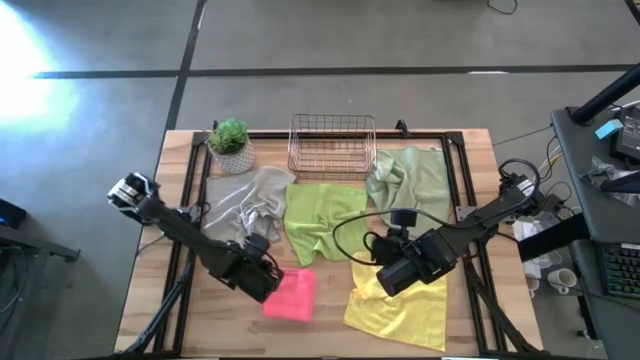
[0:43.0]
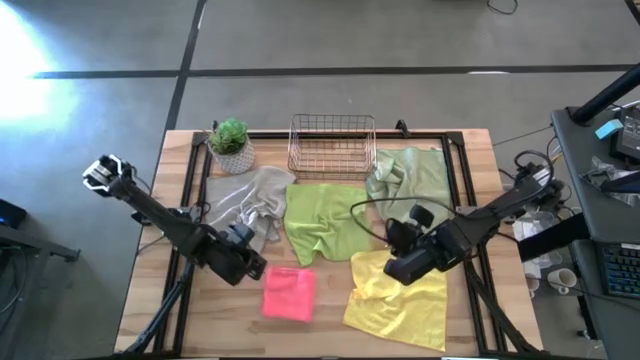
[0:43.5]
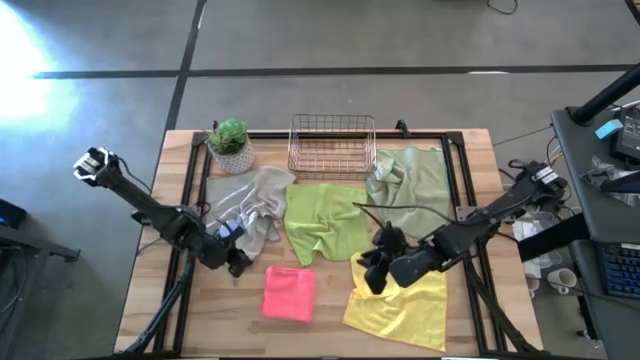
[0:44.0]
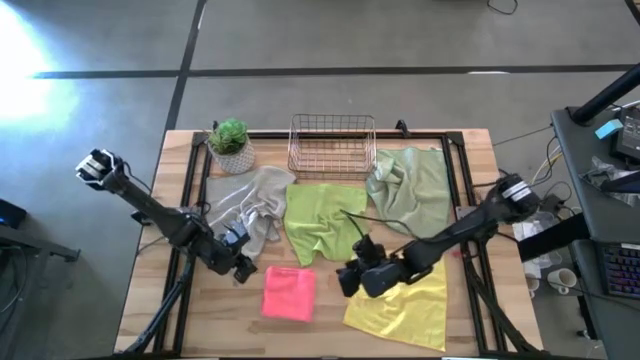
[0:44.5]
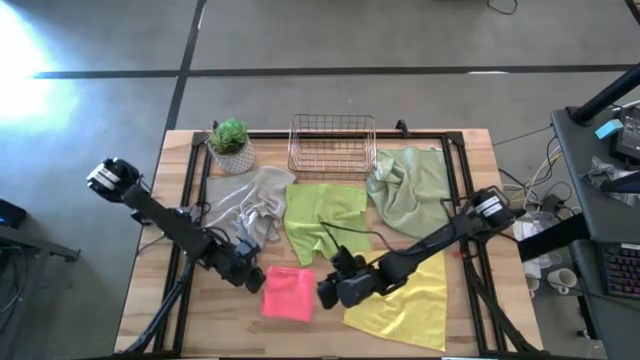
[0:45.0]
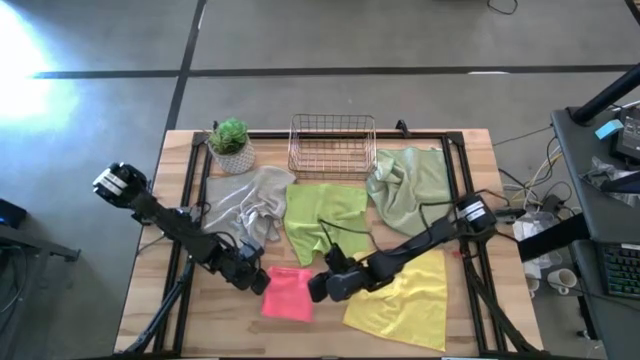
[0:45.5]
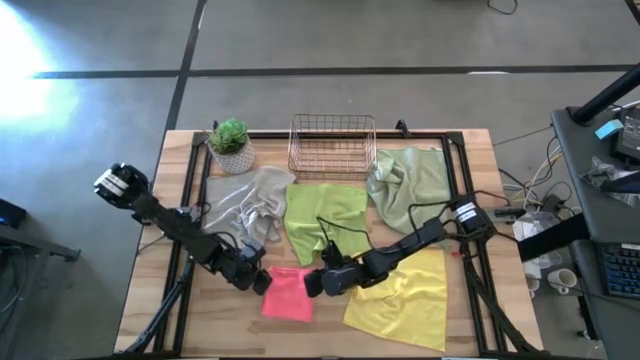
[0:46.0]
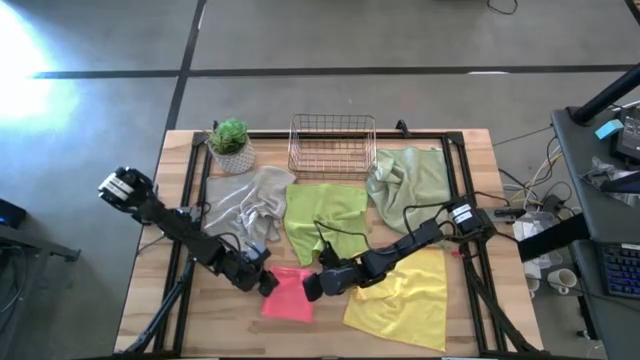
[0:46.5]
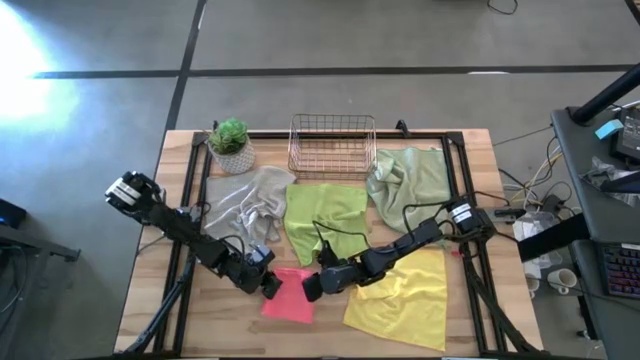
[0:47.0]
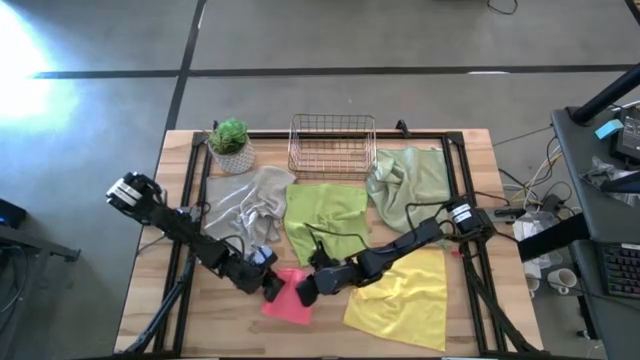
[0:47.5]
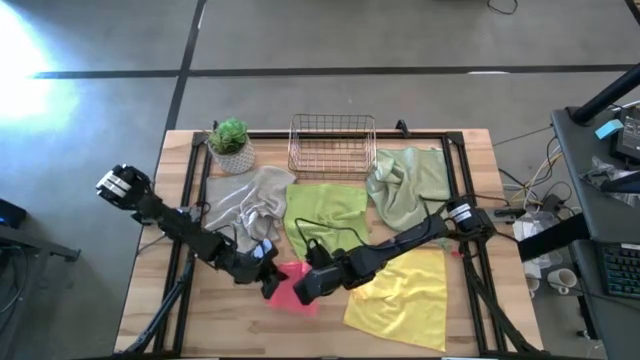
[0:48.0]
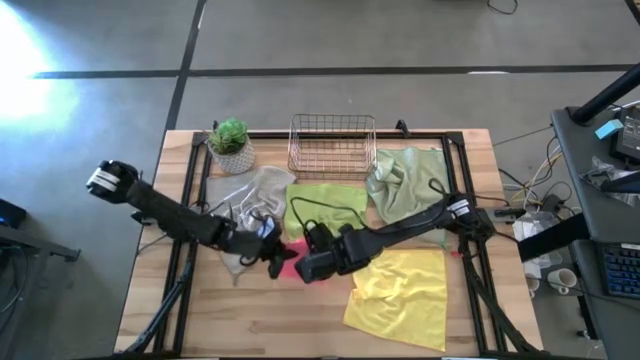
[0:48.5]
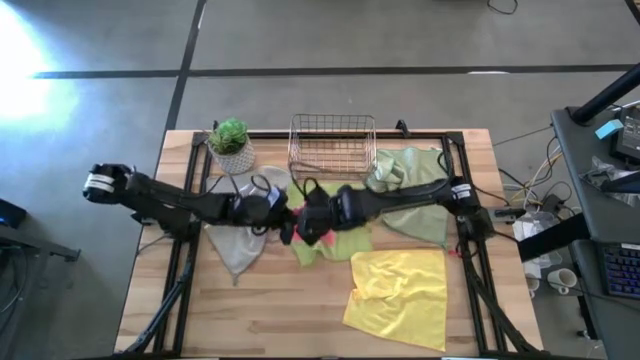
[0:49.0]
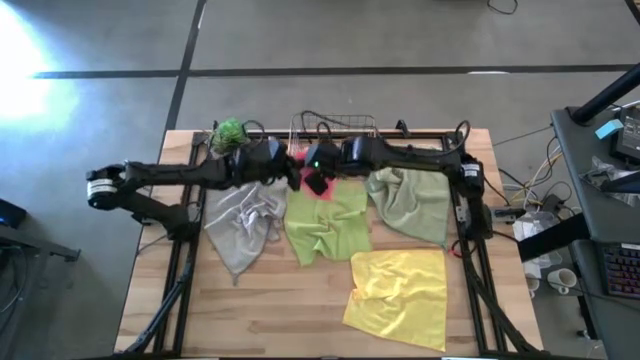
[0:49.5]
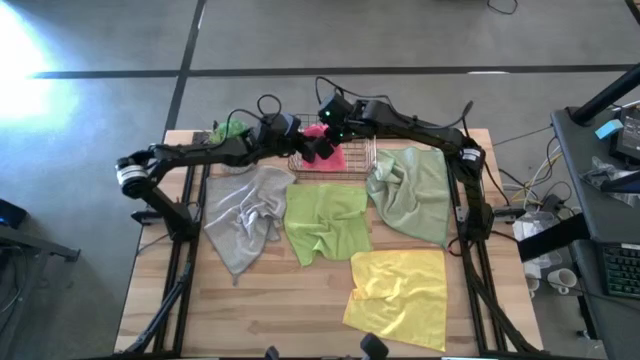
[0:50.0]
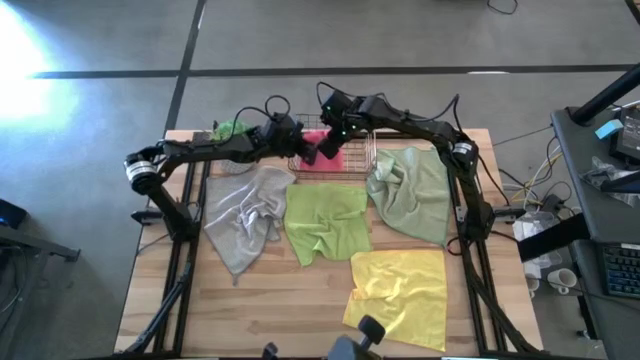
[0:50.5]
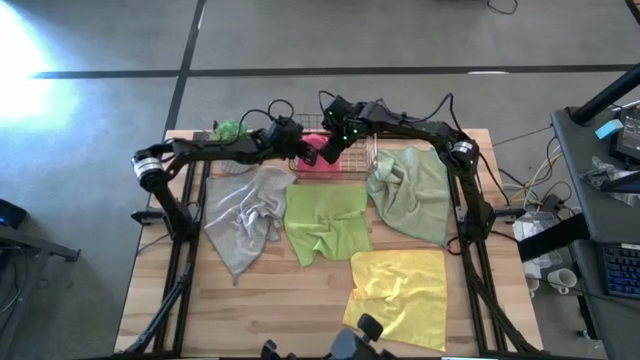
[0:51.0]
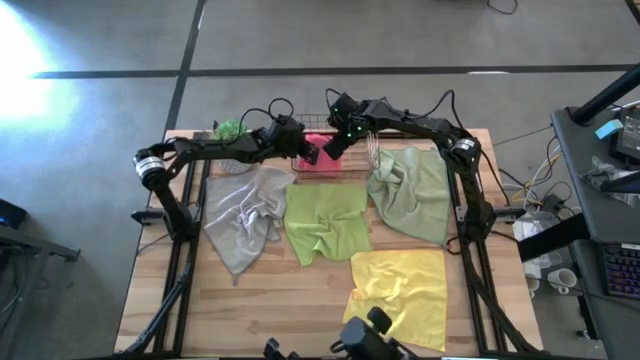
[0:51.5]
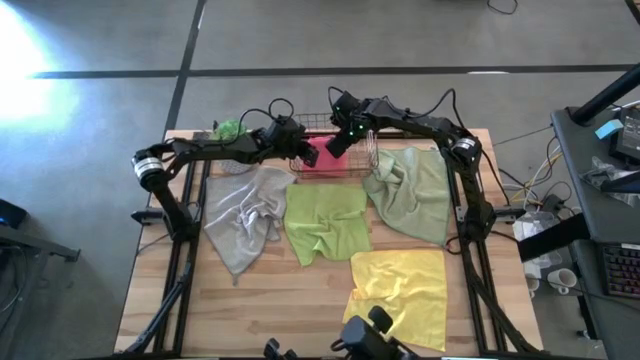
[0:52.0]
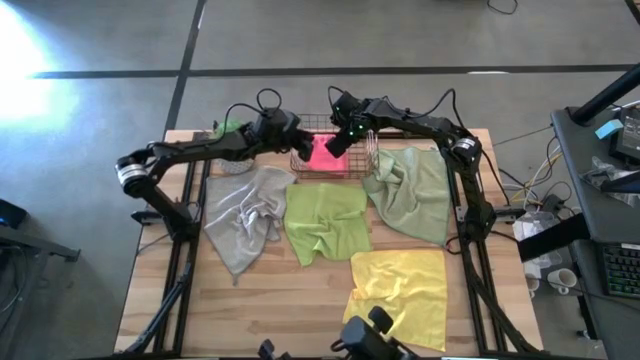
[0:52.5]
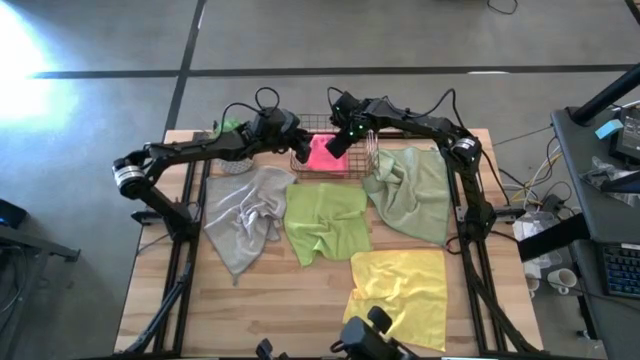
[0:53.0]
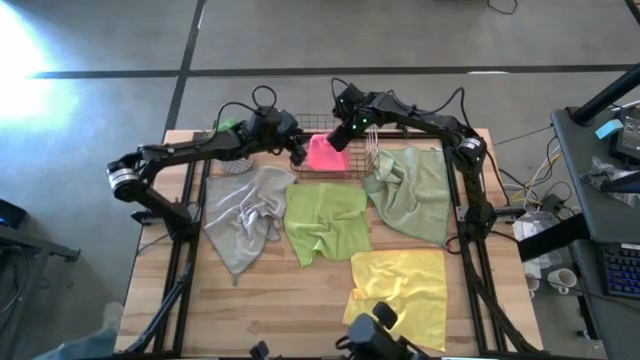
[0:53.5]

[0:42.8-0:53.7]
Task: Fold microfiber towels
Put the folded pink towel into the wire basket

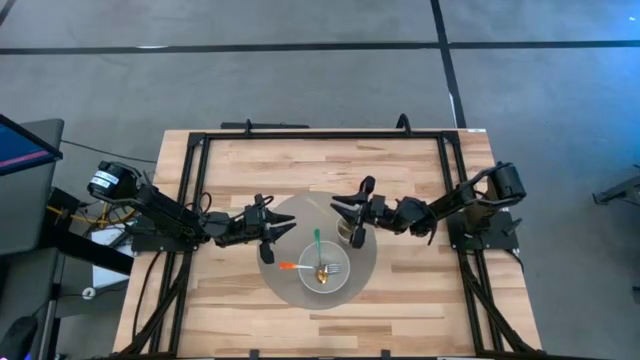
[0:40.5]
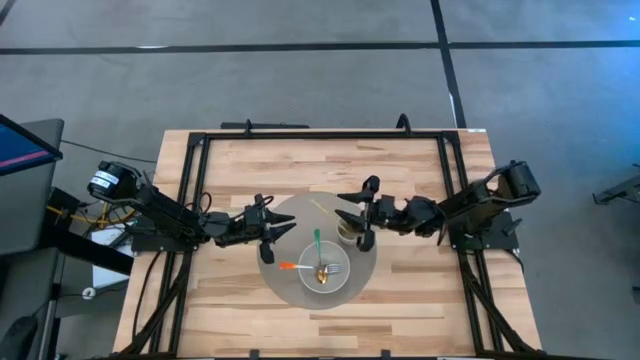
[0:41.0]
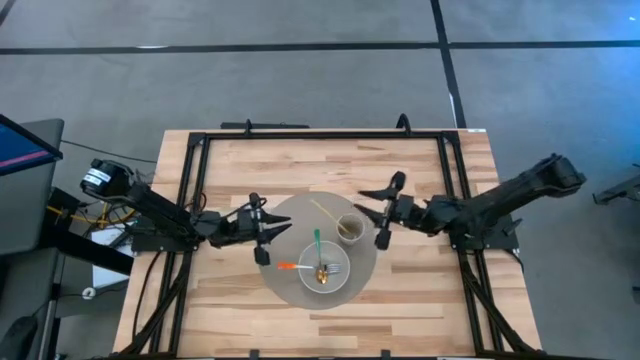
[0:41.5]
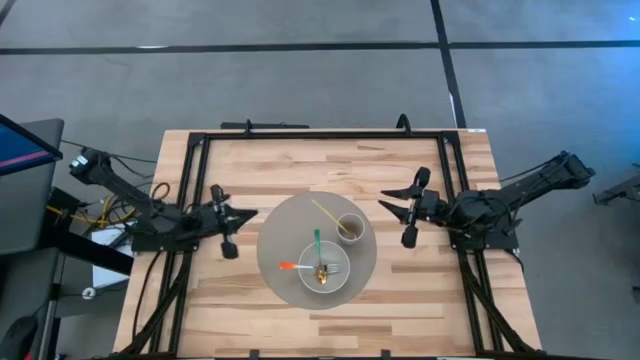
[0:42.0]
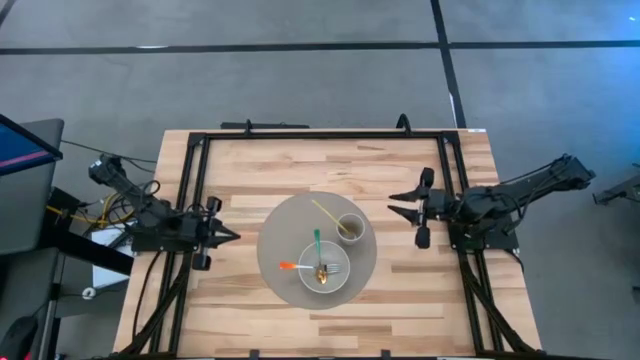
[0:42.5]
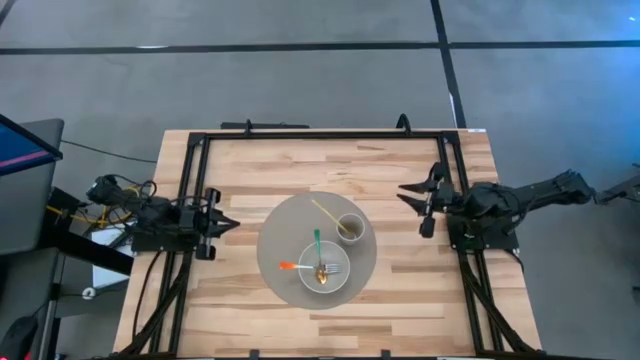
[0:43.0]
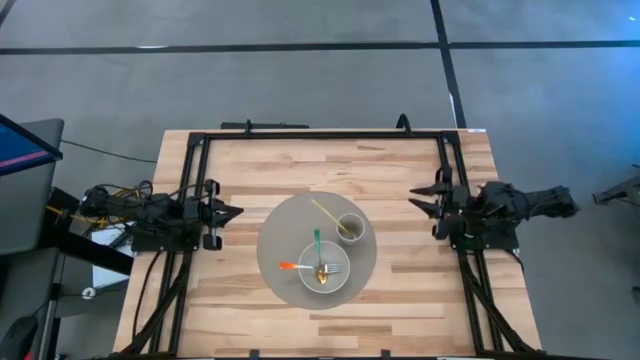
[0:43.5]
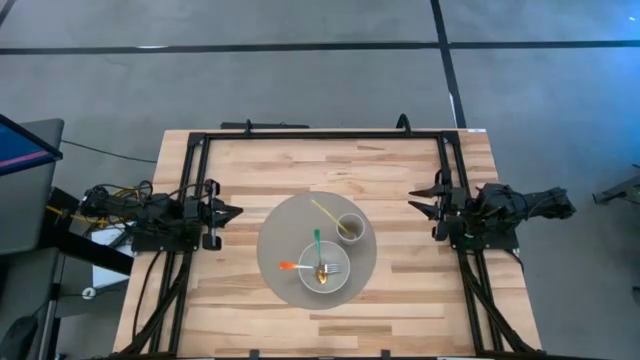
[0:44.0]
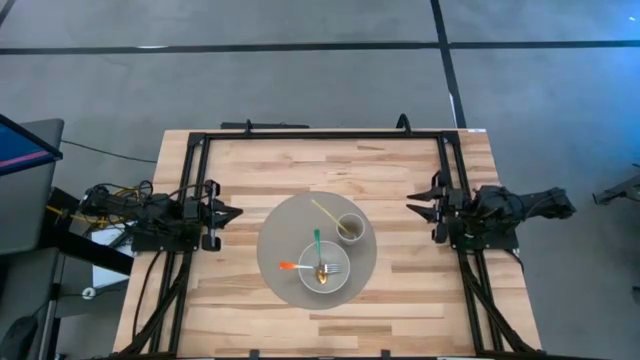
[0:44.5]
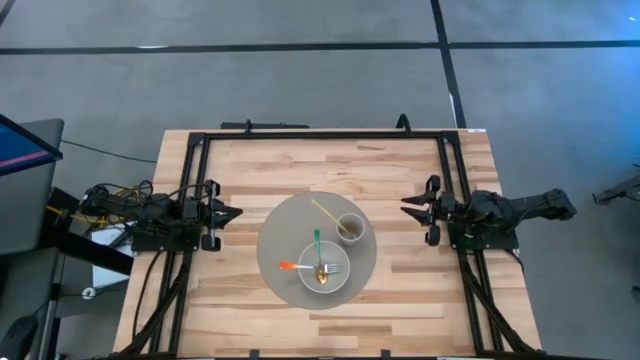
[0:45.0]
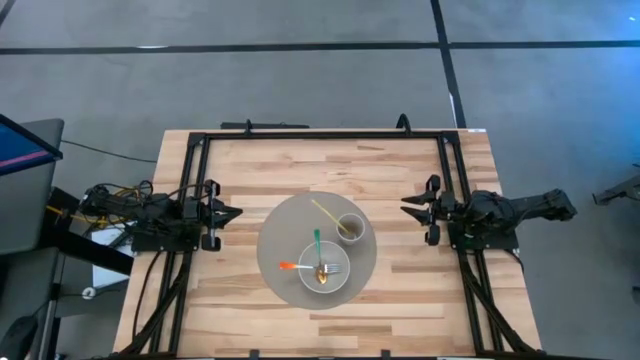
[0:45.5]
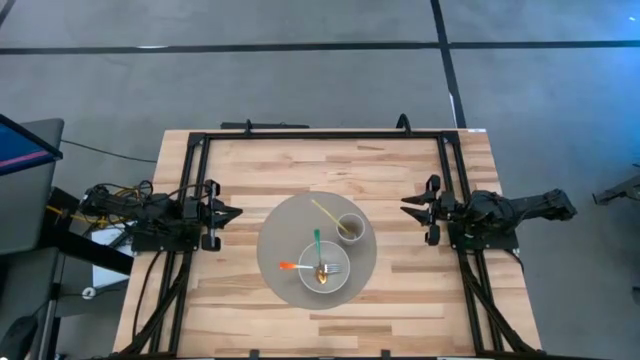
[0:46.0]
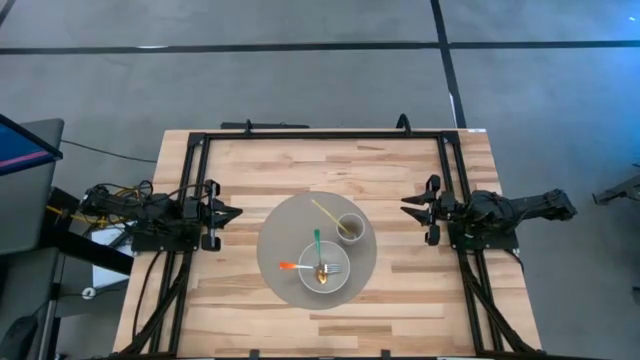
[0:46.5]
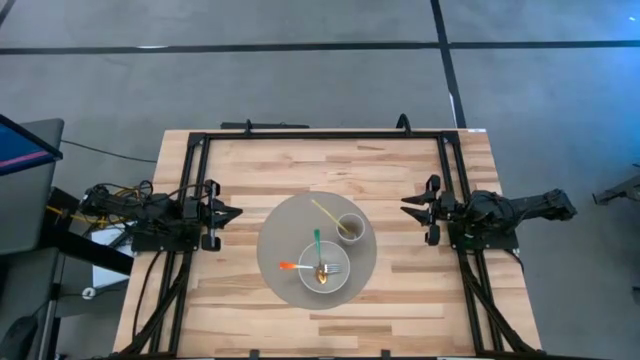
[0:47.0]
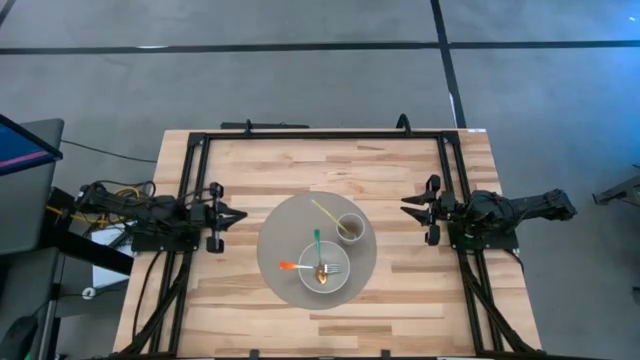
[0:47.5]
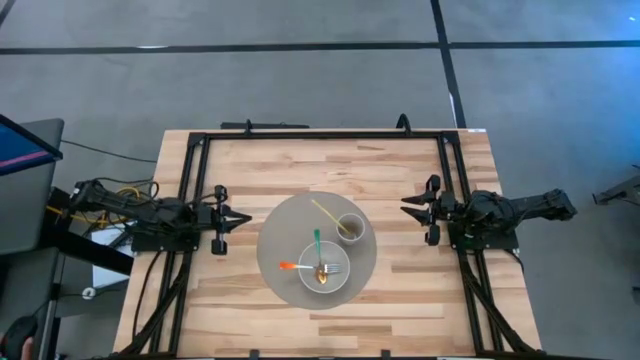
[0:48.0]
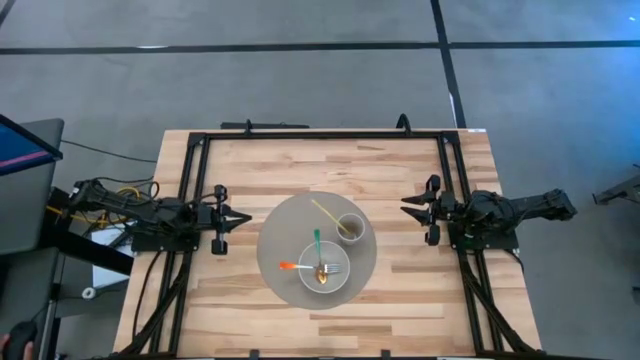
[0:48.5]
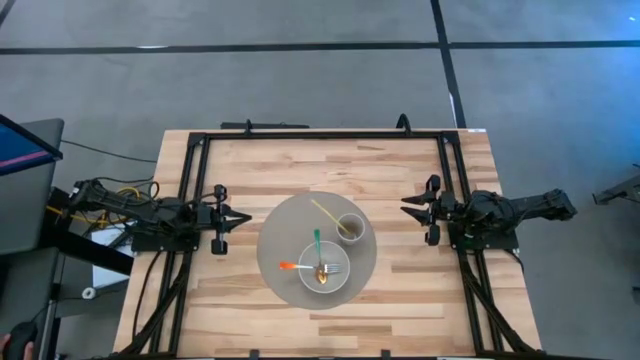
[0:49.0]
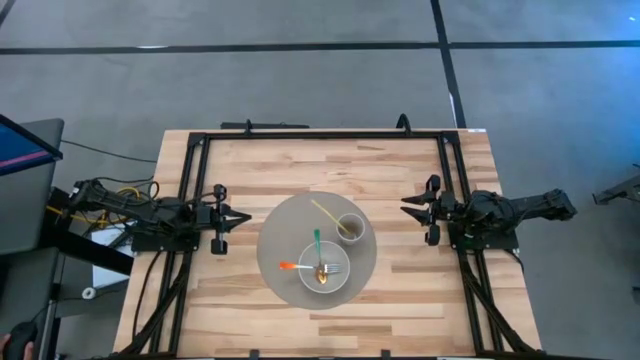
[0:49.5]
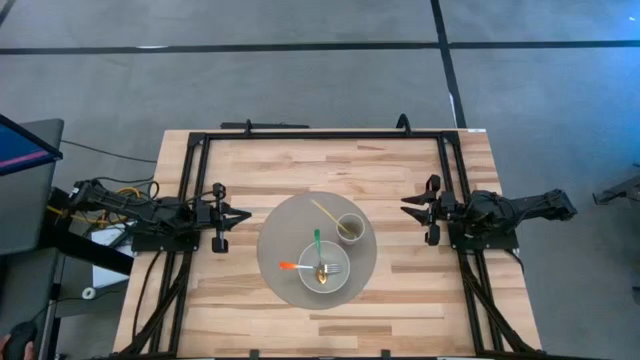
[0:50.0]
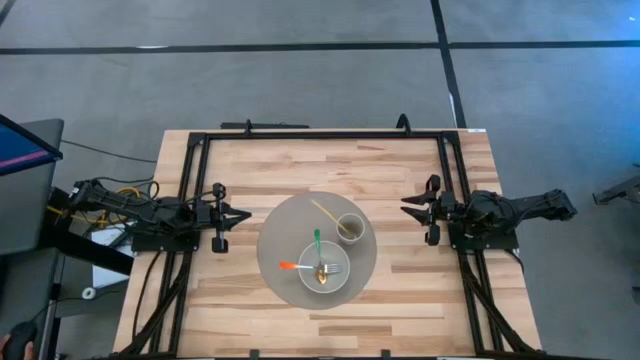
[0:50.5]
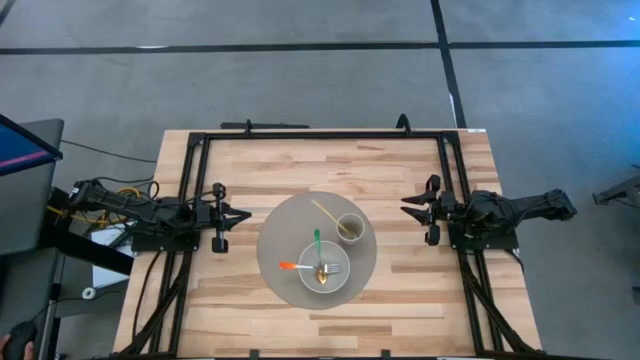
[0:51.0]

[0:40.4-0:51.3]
Task: Pick & Place Utensil
Return to Home Position
